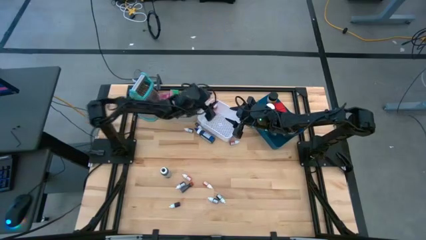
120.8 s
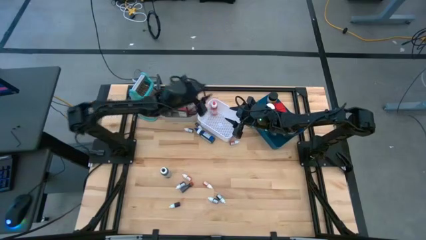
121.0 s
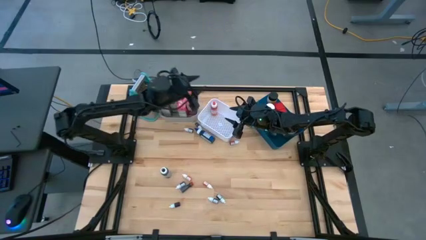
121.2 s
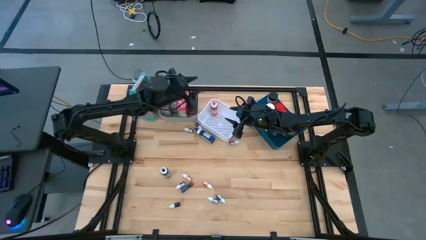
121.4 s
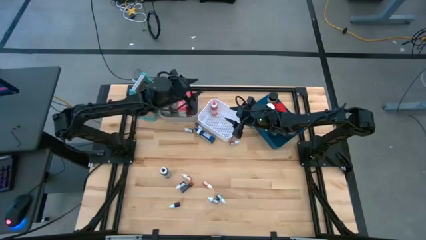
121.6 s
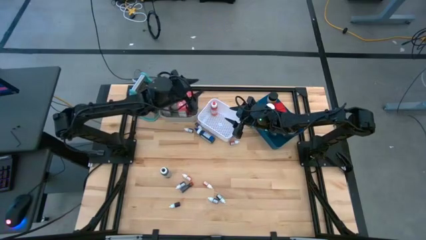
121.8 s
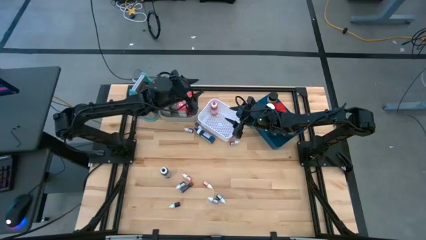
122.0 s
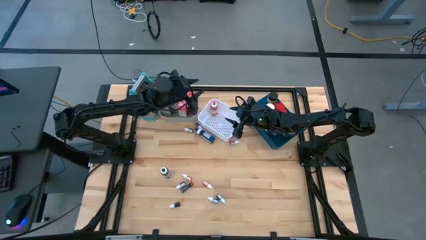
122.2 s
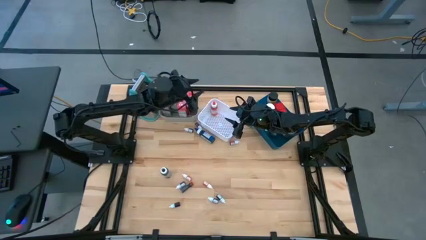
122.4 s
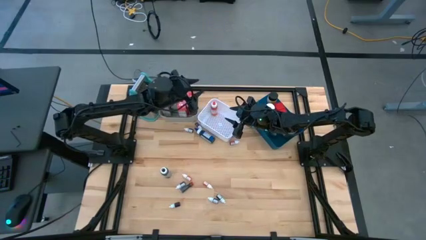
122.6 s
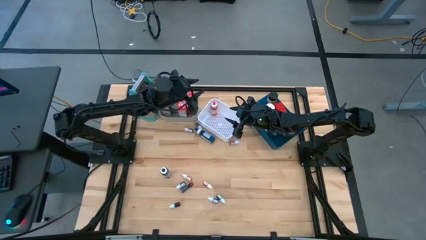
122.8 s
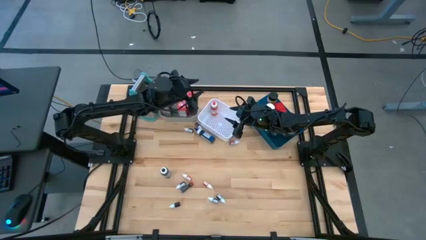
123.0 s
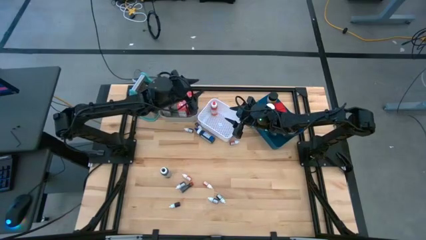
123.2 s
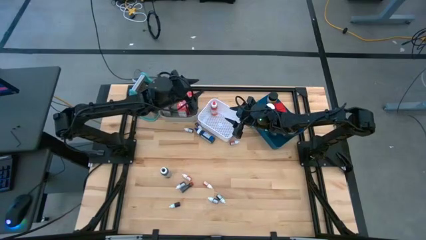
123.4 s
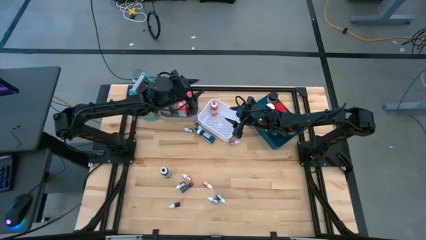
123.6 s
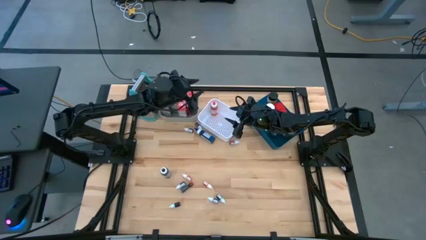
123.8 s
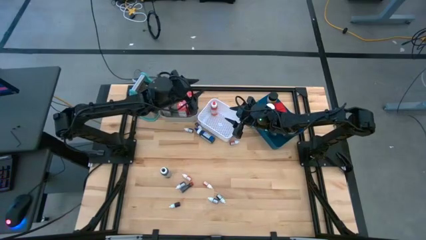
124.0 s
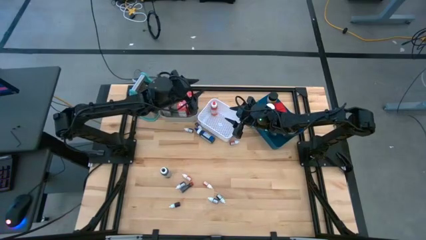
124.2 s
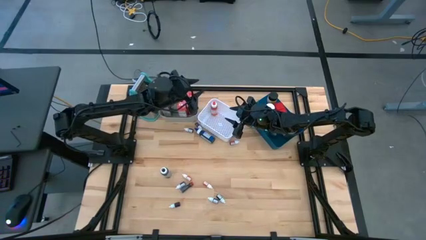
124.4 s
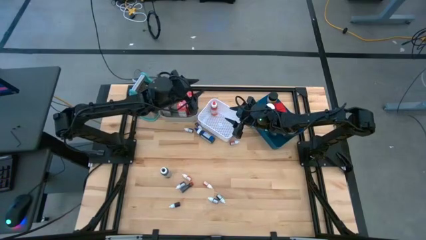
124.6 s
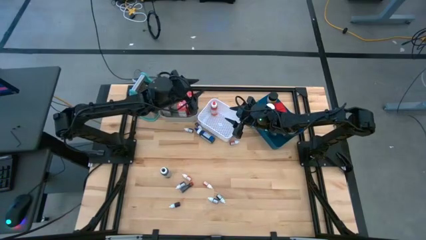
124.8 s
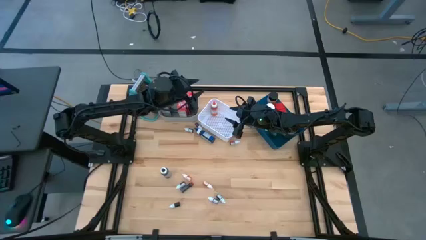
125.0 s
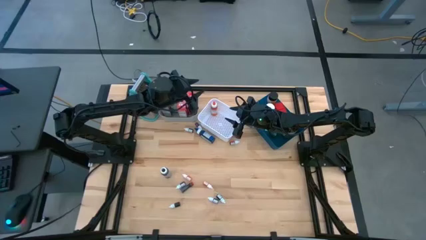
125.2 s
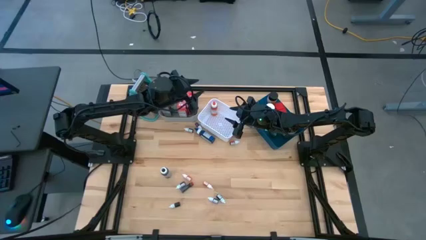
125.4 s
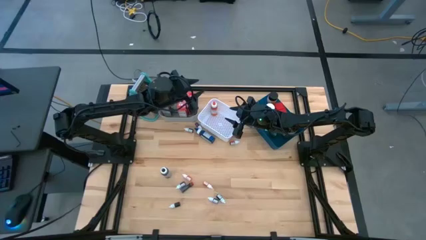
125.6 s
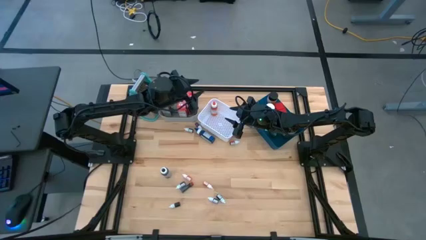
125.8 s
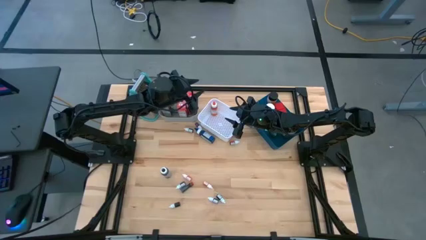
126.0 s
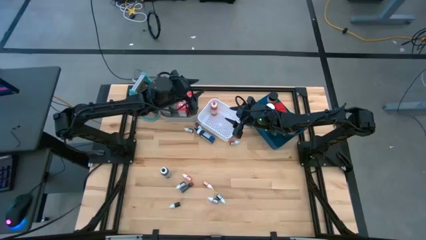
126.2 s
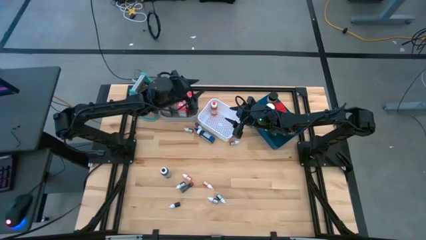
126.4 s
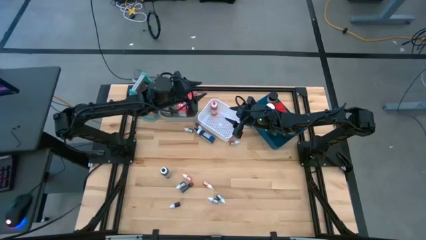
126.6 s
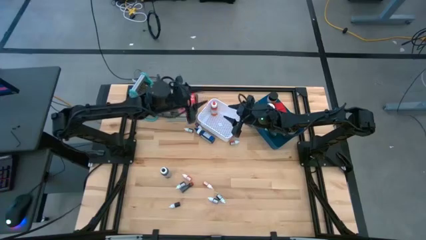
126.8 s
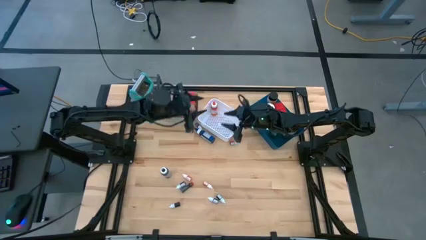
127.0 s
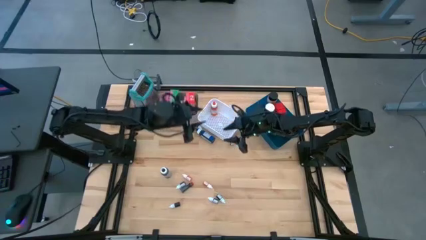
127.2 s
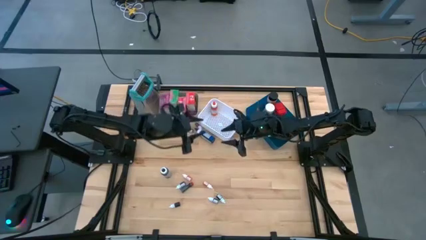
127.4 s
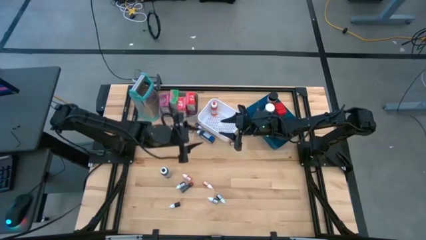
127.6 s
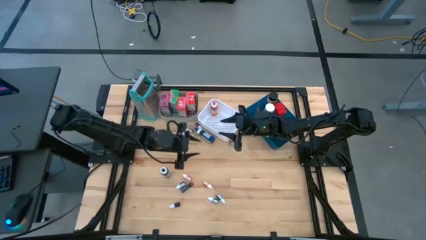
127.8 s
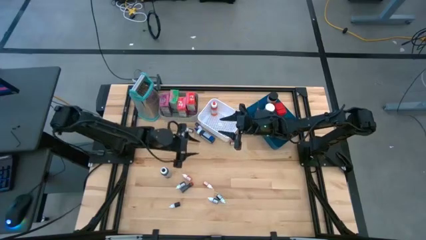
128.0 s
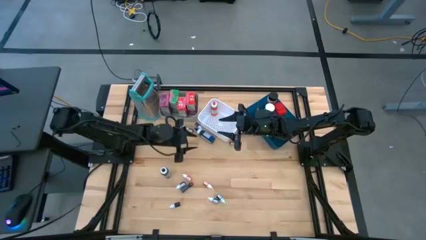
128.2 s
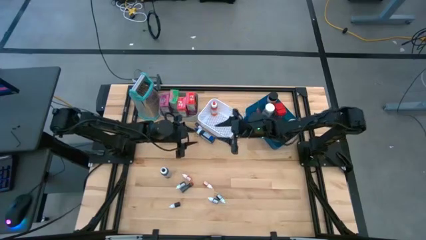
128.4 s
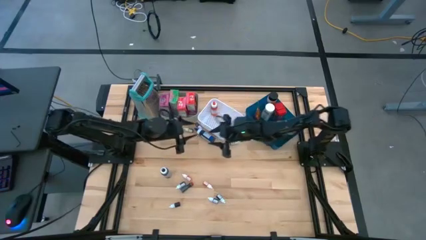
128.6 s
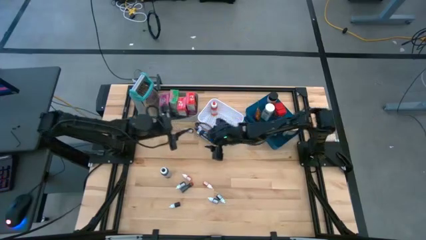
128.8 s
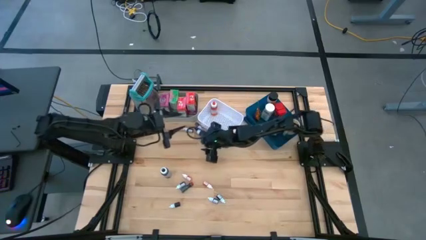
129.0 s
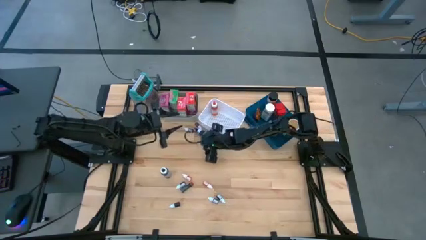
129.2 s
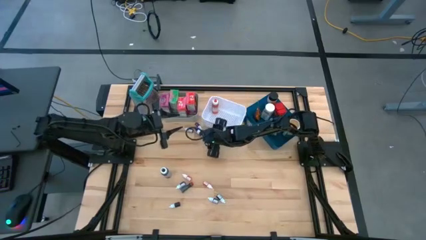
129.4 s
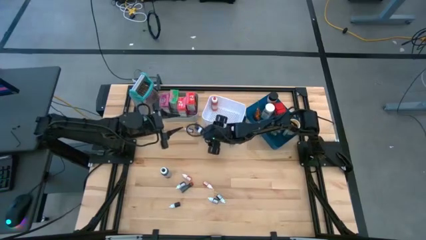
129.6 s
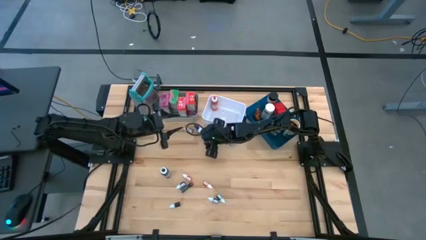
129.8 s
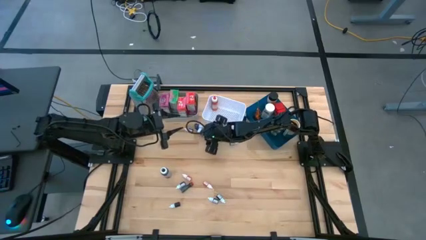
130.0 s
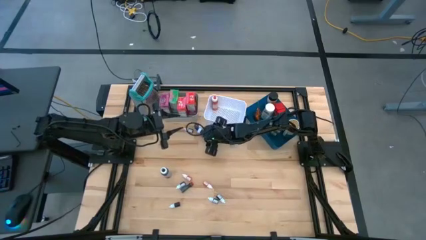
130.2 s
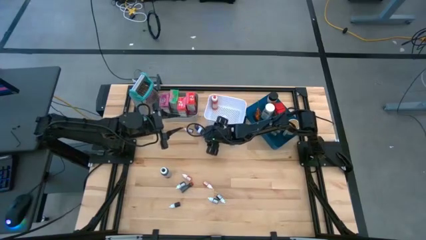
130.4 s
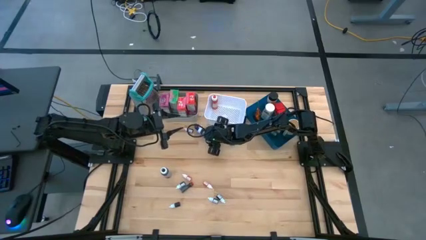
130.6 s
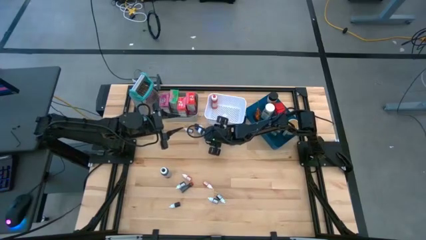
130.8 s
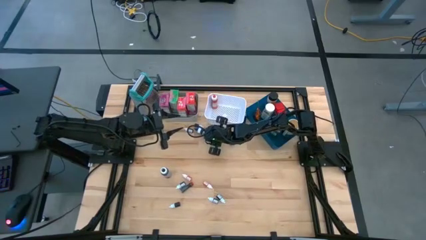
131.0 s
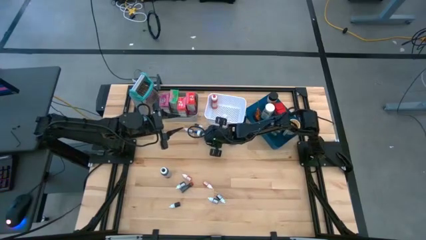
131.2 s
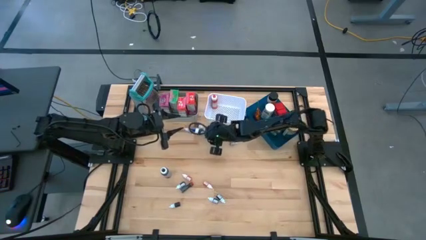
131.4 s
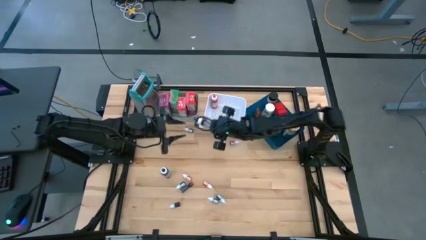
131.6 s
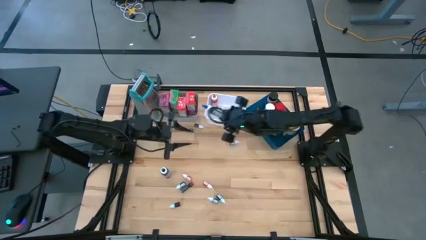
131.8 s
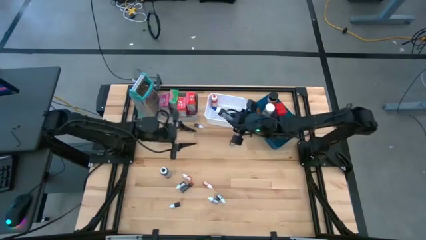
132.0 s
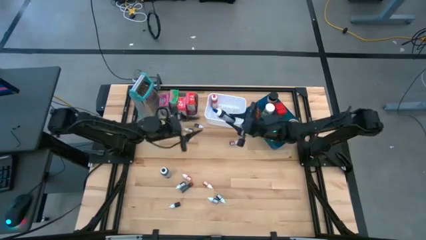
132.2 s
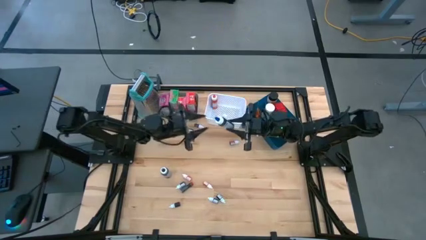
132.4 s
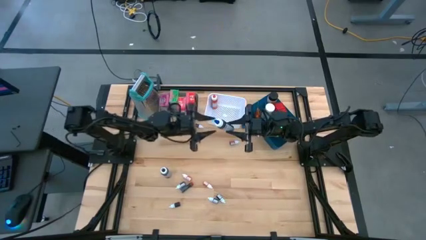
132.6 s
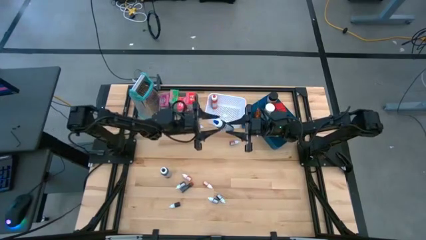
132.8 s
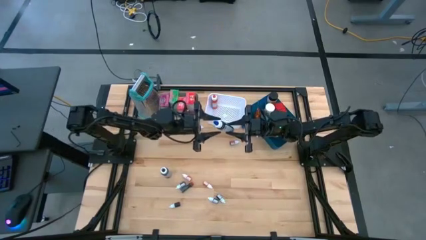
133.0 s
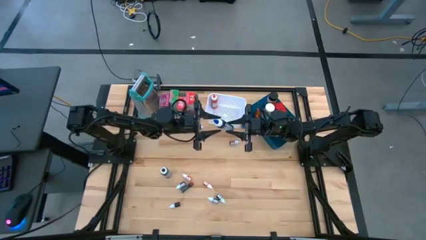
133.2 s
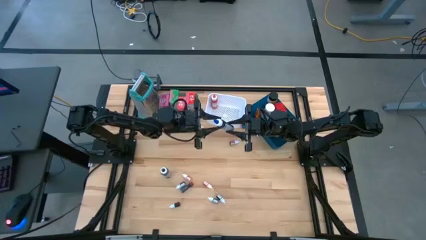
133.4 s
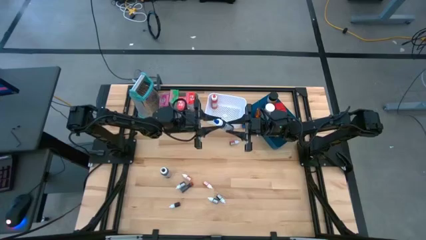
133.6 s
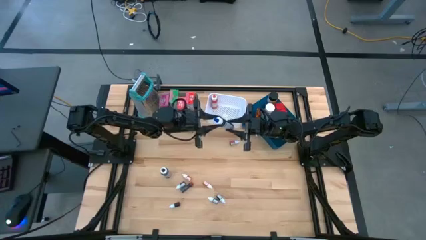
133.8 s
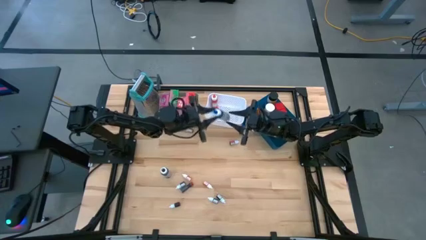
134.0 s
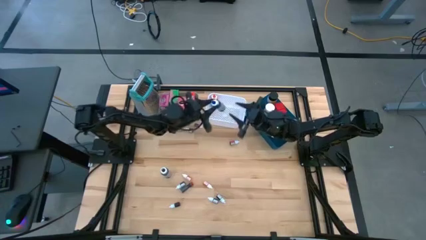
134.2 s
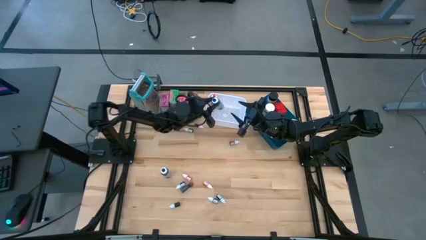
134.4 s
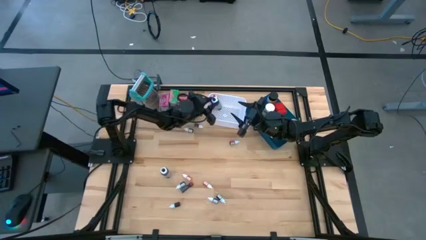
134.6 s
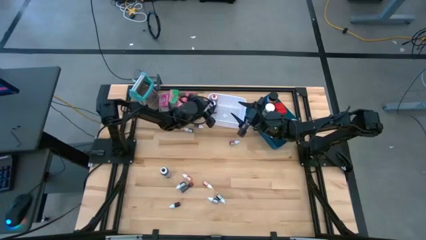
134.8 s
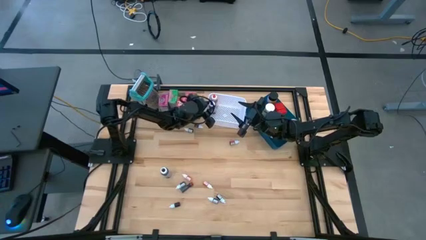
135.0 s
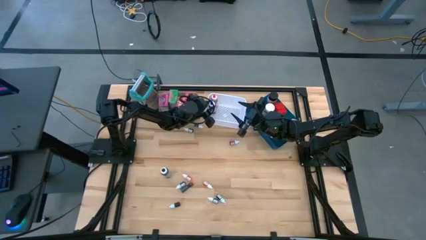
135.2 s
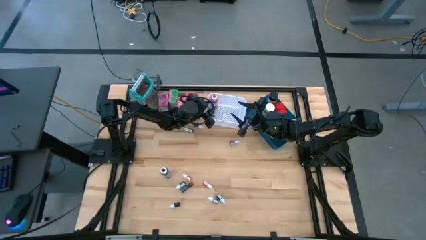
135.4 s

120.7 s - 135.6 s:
Task: Pick & Place Kitchen Items
Put the large blue food coloring bottle into the white bin

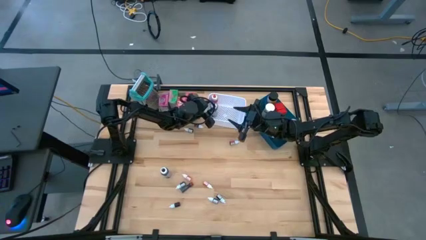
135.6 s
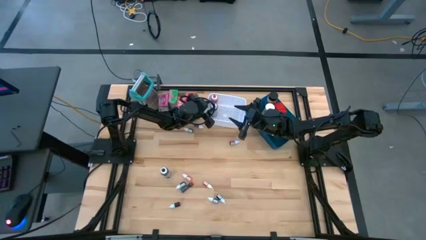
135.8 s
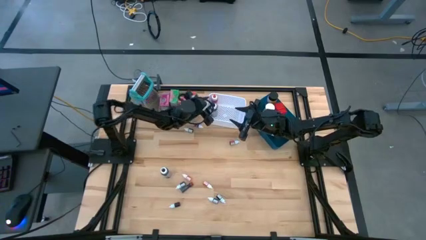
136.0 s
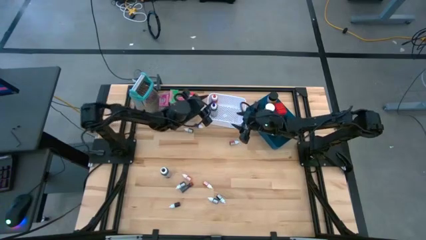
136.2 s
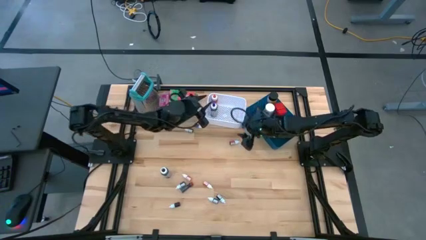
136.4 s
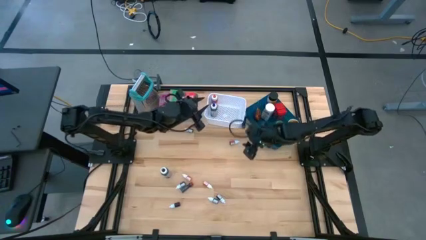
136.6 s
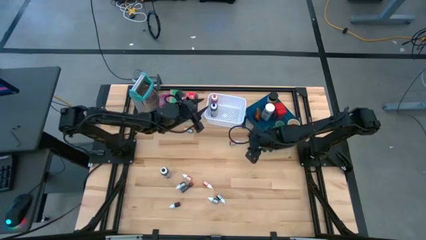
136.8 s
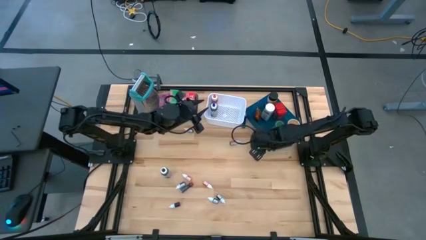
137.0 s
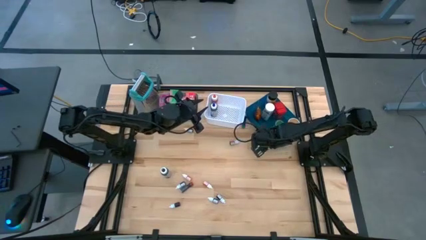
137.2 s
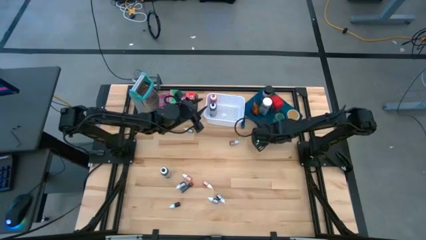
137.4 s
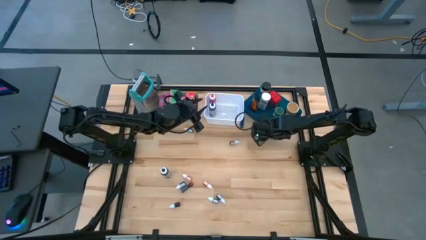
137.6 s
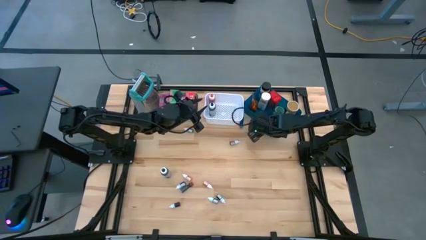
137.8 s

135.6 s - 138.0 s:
Adjust the blue bin
